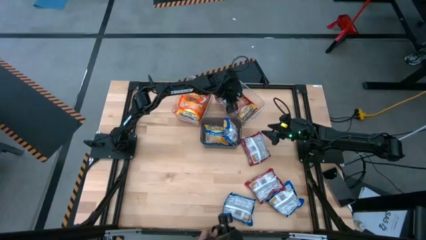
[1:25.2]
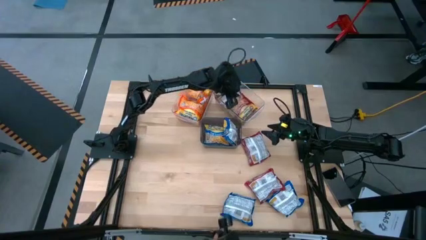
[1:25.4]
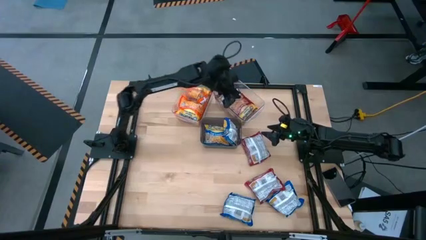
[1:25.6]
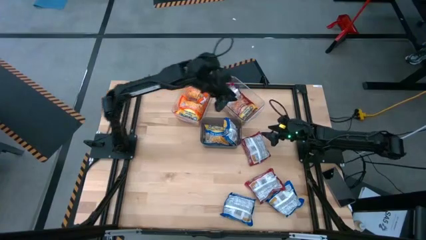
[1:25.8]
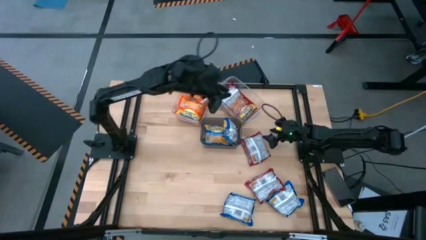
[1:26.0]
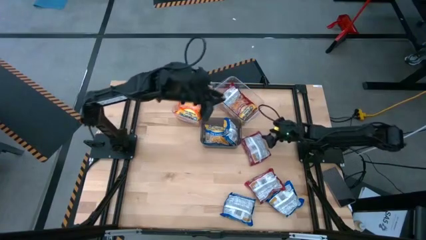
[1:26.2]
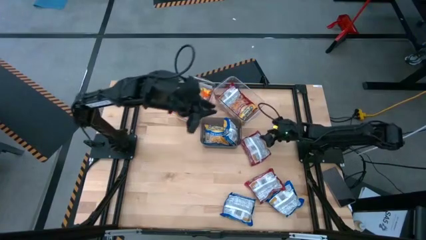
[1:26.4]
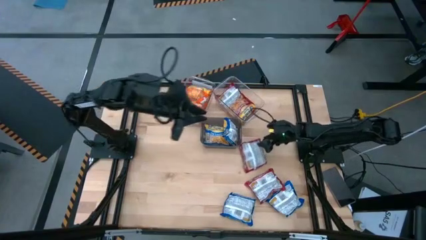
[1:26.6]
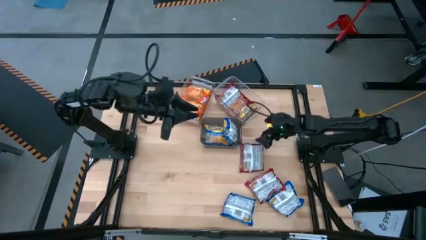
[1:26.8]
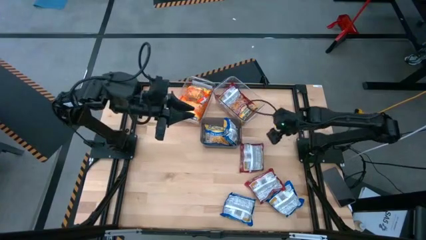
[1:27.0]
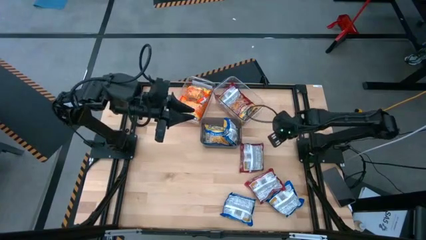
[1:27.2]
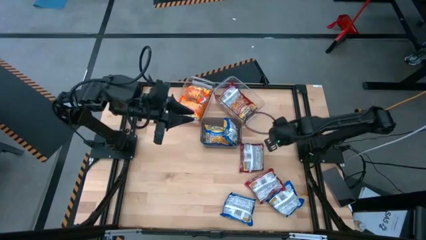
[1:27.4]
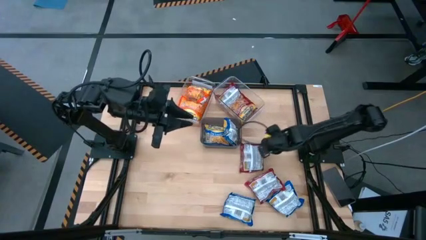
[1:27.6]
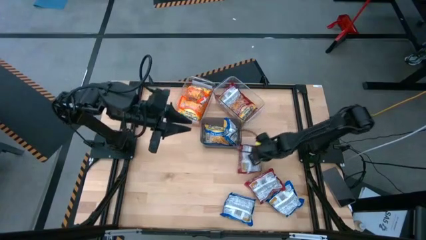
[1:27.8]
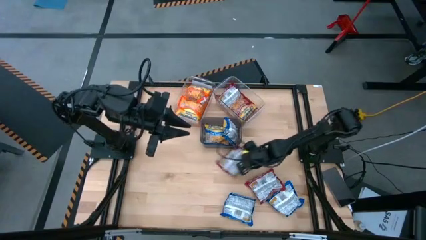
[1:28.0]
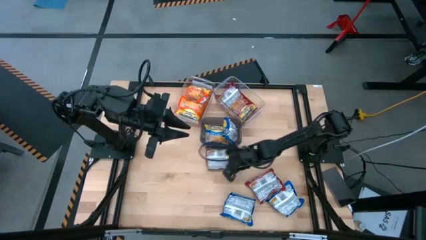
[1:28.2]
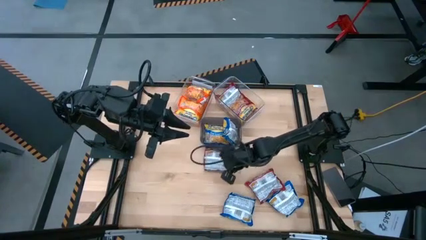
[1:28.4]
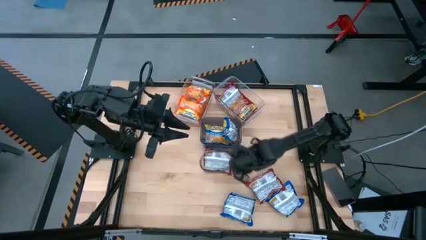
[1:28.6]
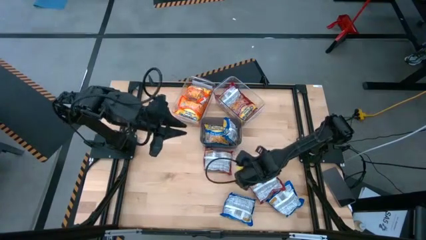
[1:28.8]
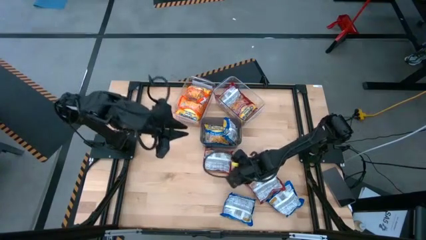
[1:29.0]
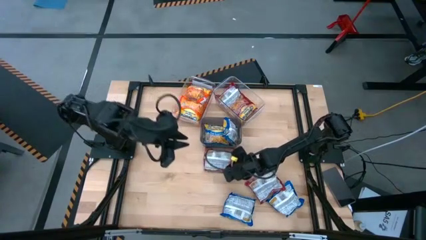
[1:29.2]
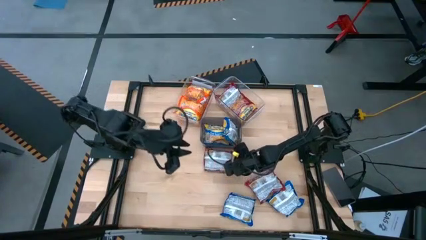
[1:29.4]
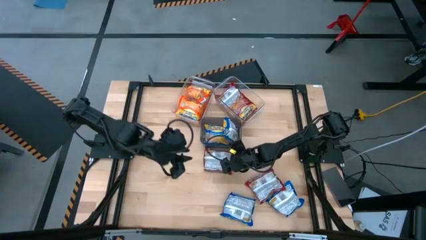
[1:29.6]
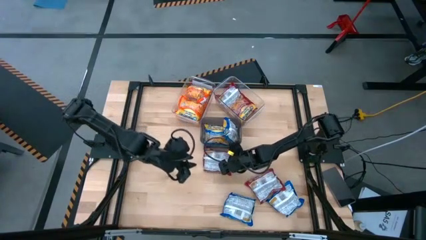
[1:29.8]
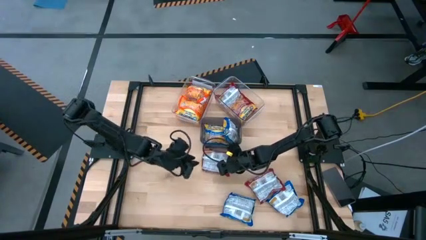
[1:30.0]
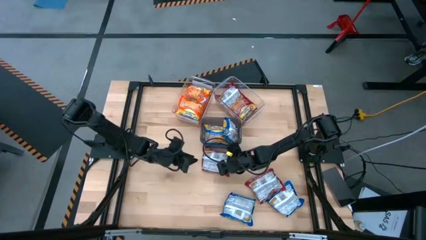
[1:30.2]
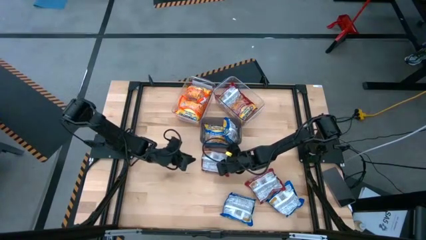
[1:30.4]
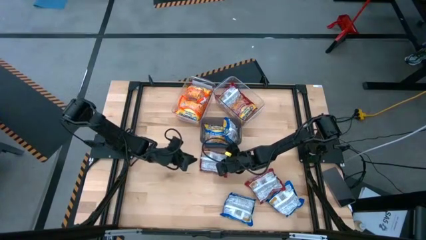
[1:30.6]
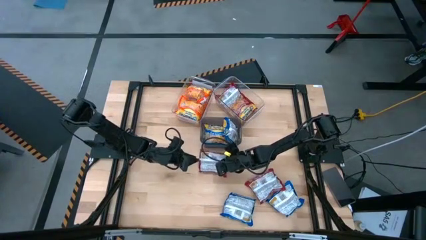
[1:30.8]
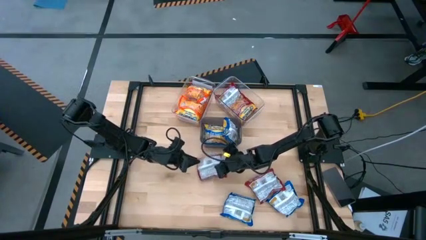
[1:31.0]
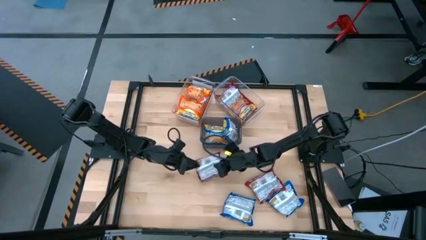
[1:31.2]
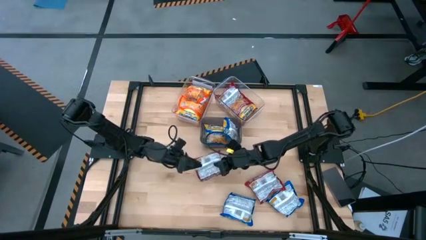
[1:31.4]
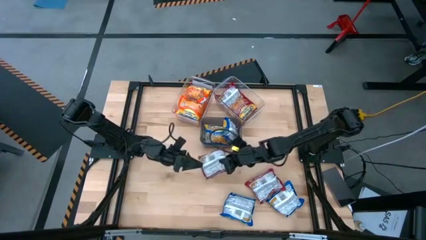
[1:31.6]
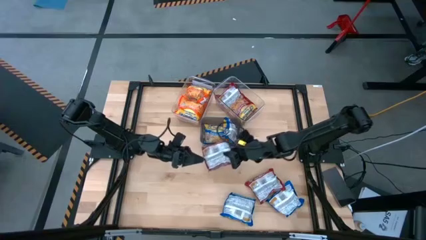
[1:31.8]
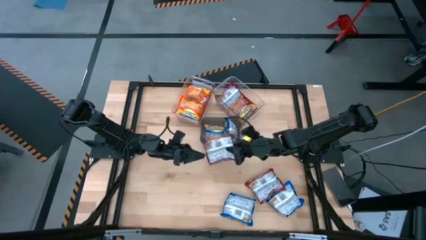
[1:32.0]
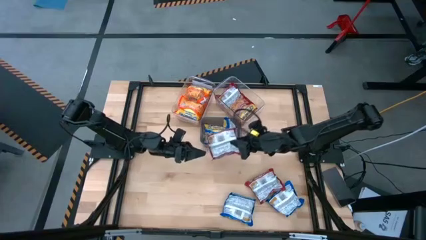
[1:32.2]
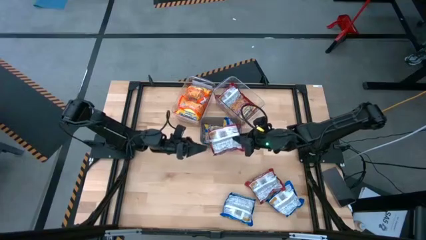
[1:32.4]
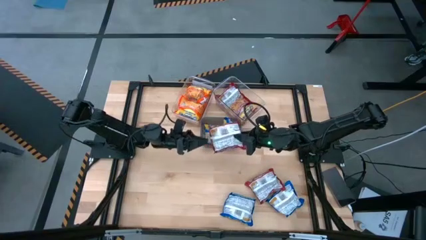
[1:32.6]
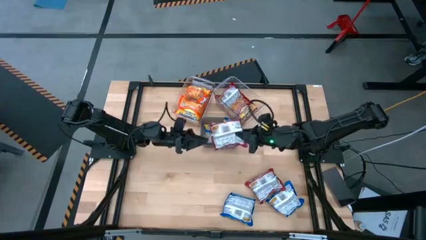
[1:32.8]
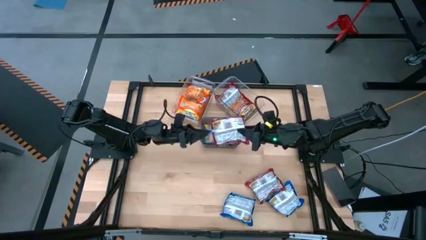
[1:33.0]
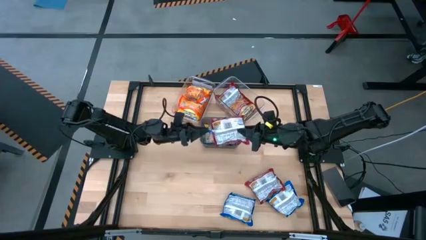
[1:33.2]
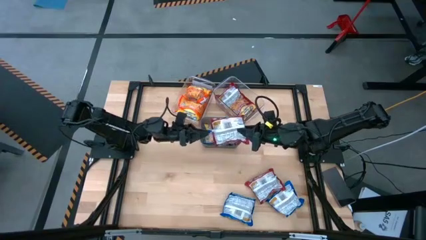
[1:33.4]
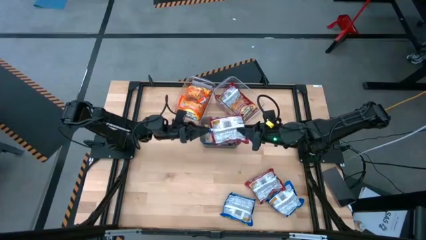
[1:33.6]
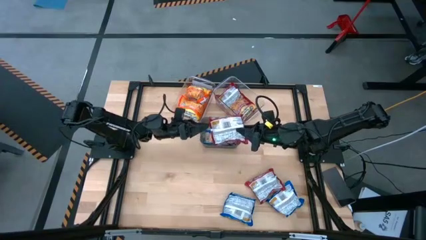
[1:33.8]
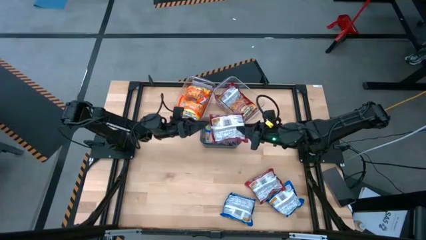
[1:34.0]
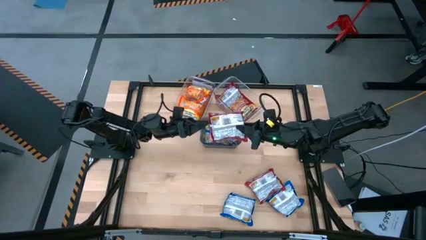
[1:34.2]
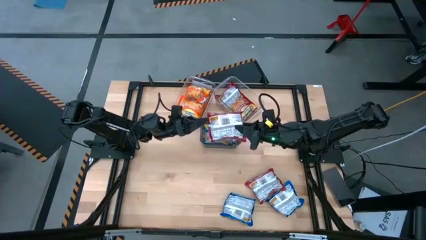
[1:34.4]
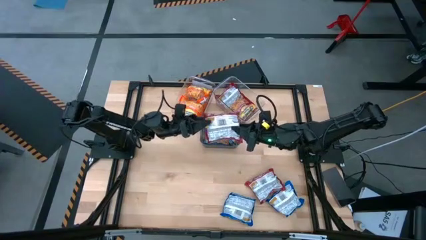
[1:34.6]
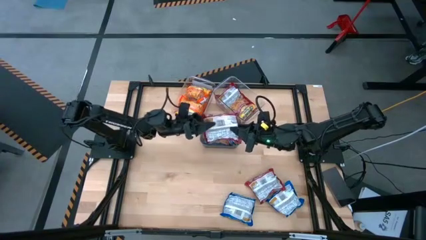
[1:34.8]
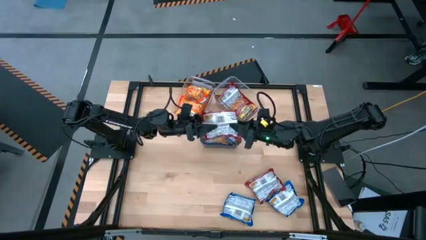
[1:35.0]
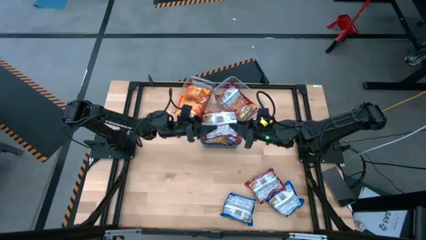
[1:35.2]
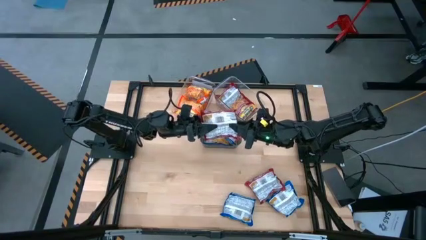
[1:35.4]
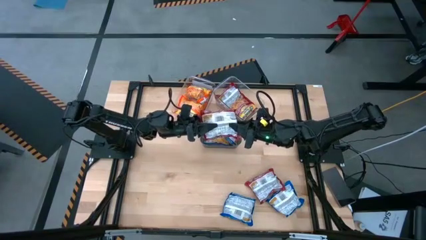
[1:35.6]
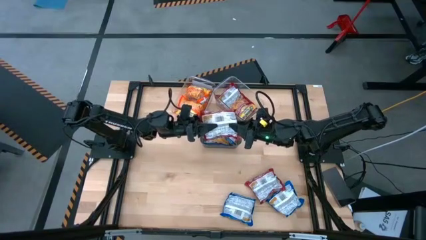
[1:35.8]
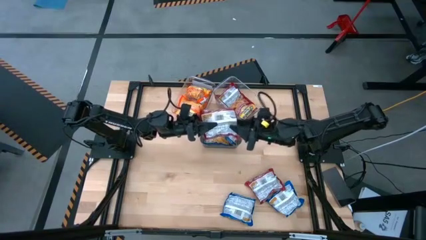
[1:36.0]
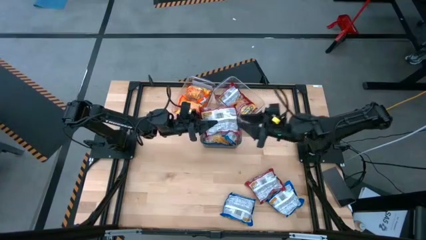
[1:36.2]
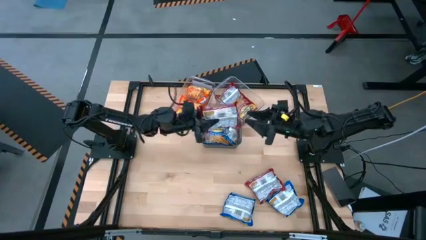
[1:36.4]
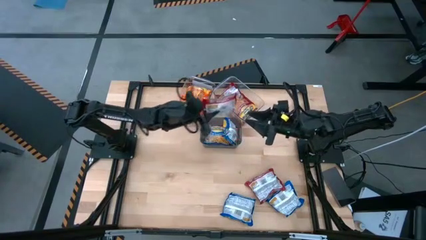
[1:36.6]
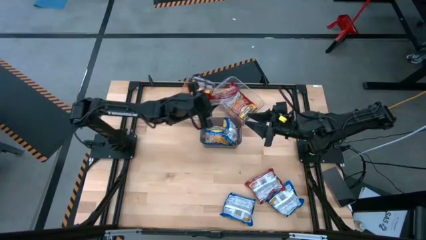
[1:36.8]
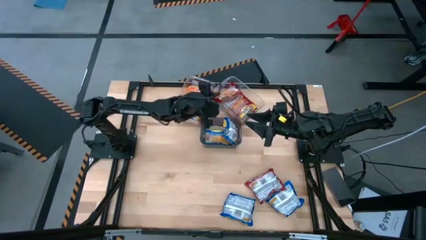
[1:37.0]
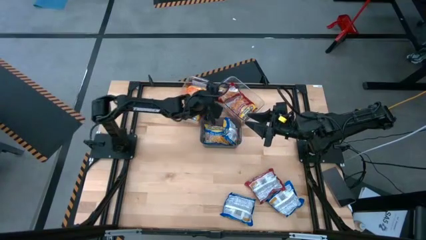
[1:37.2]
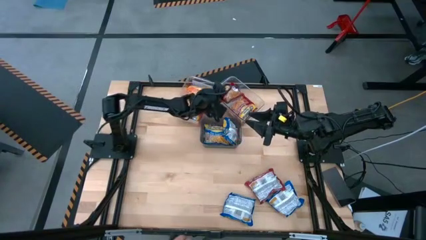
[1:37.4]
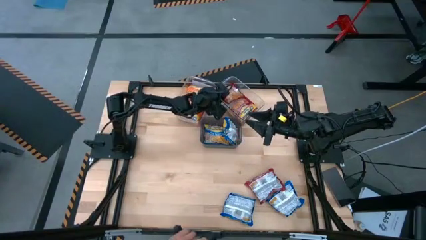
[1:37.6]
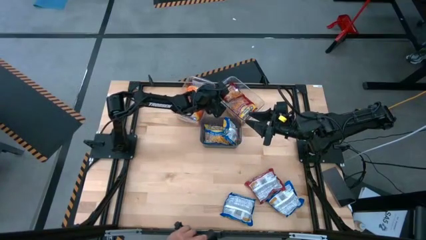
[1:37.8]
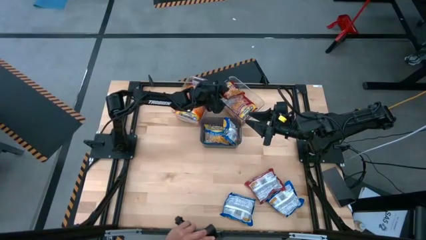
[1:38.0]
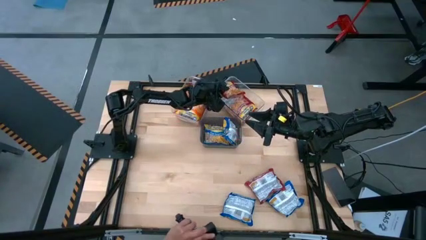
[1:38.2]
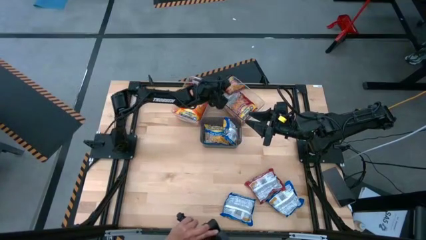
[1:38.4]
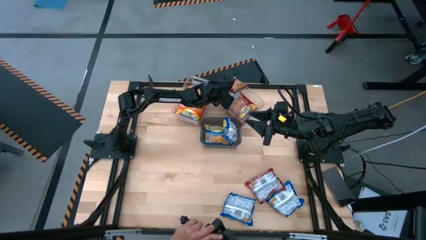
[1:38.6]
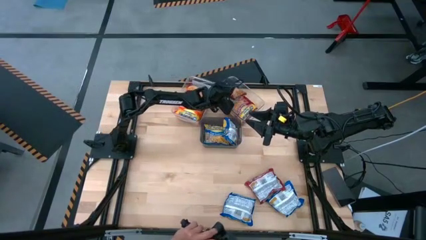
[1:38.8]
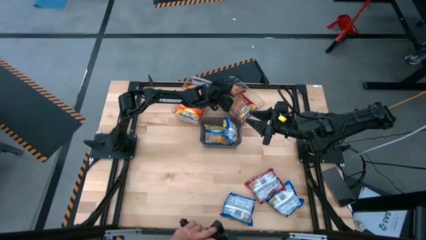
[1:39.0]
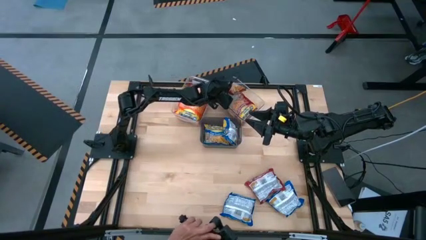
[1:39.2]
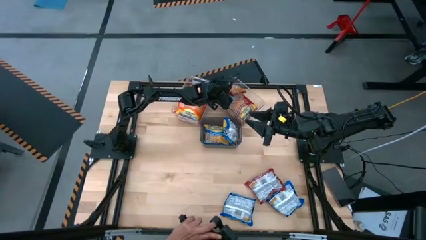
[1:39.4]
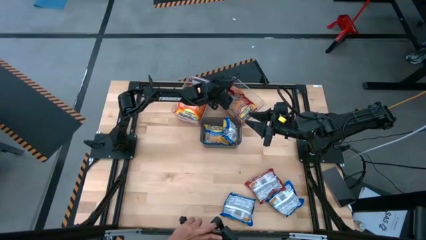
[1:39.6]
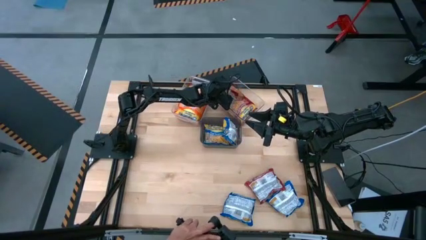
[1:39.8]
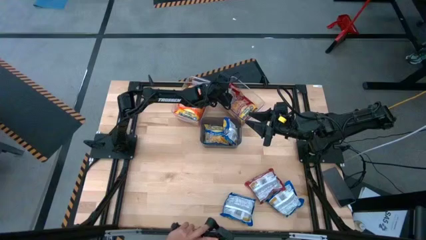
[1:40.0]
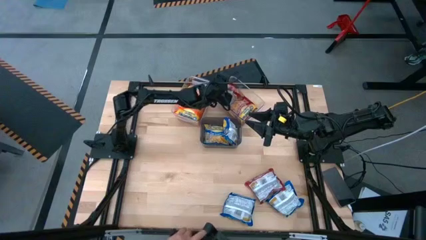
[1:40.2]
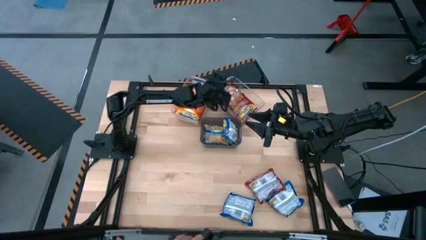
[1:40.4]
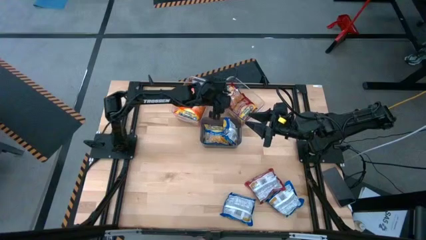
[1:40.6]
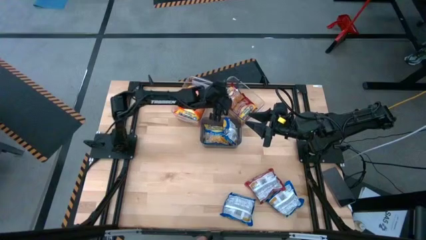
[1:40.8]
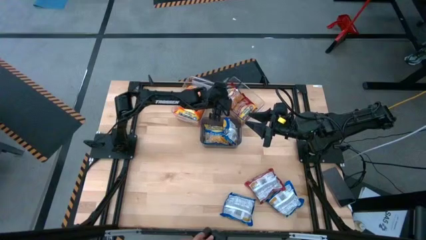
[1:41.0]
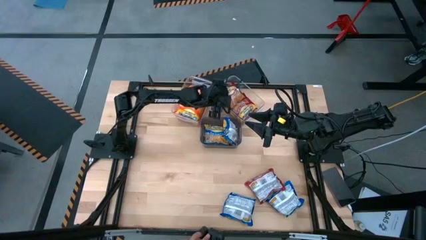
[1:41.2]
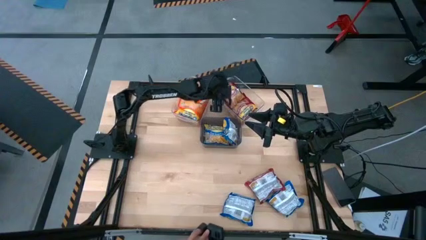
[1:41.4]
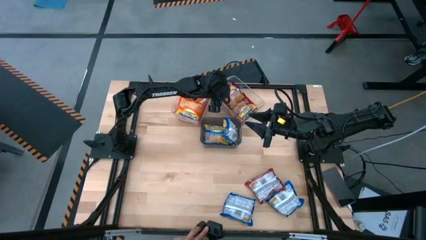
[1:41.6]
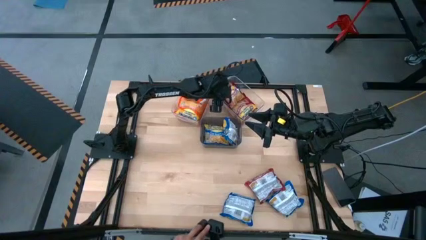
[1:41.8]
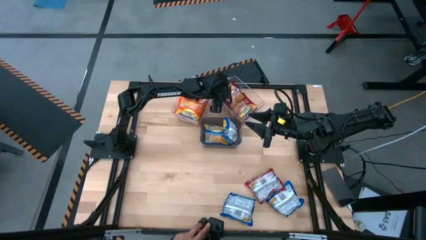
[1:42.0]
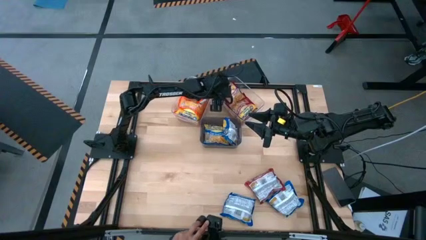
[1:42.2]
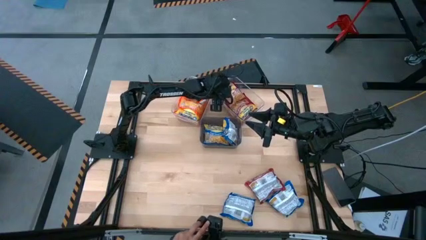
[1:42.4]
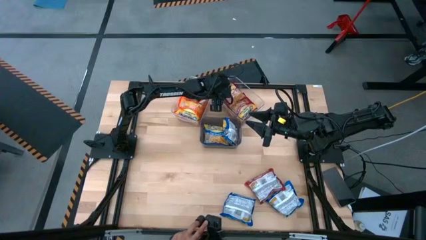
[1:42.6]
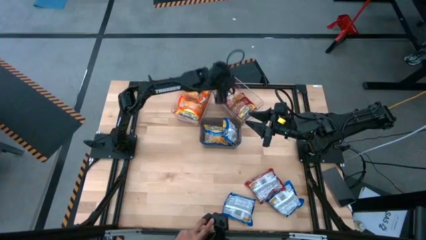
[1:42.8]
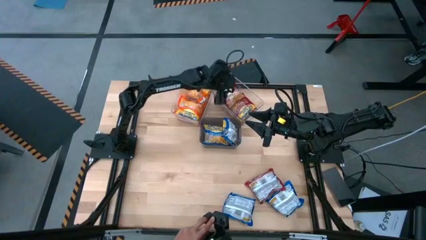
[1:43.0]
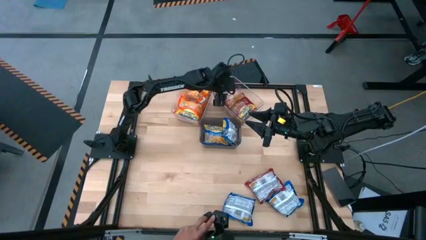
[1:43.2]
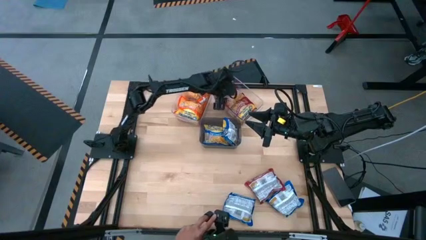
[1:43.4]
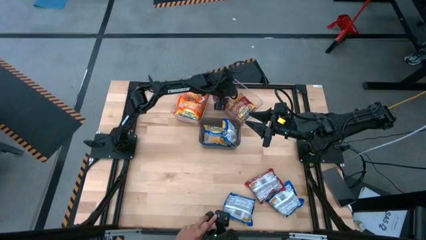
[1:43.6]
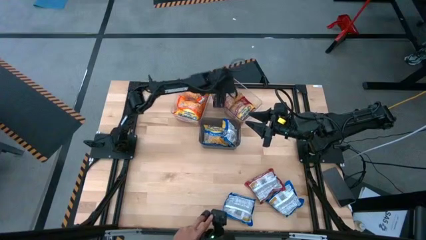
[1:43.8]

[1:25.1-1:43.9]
Task: Sort Maruchan noodles
Put the red noodle pack into the right transparent bin
